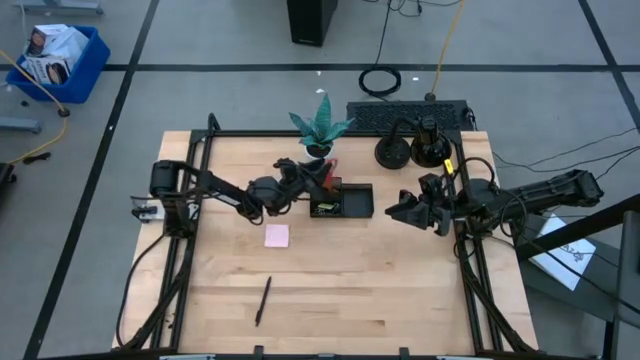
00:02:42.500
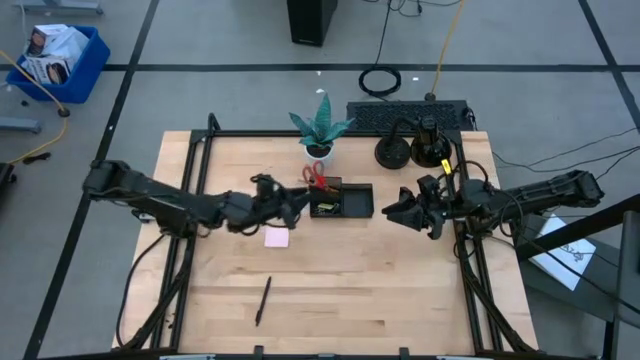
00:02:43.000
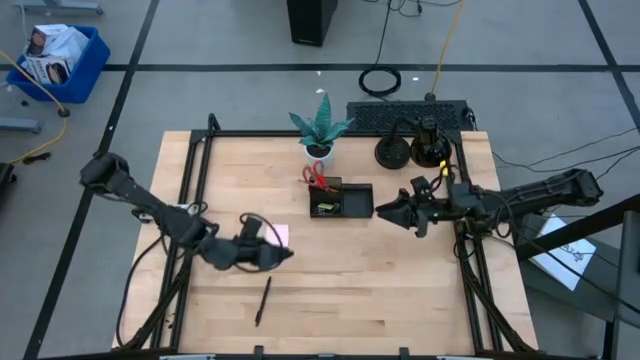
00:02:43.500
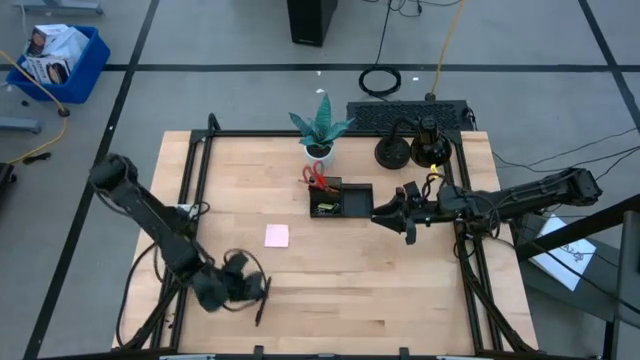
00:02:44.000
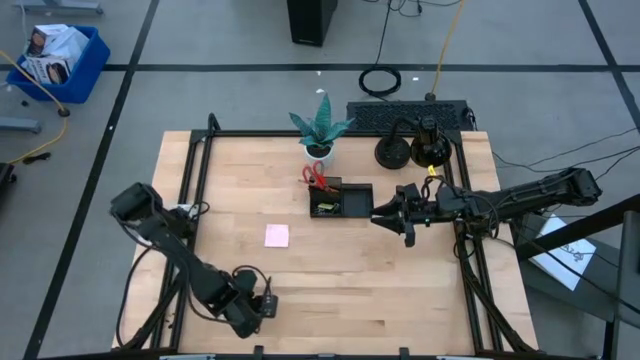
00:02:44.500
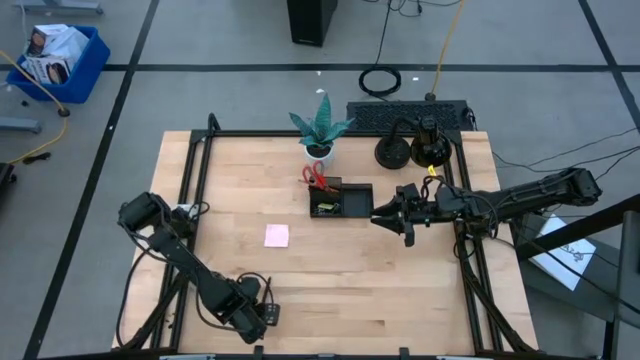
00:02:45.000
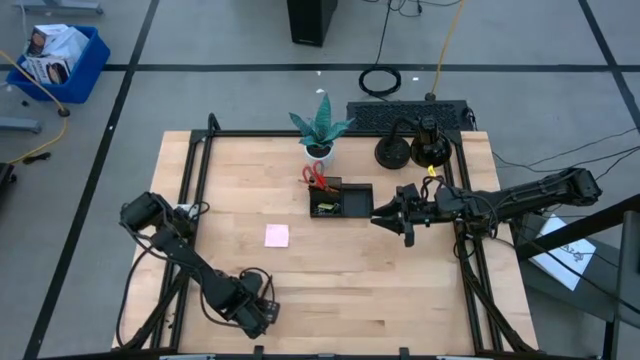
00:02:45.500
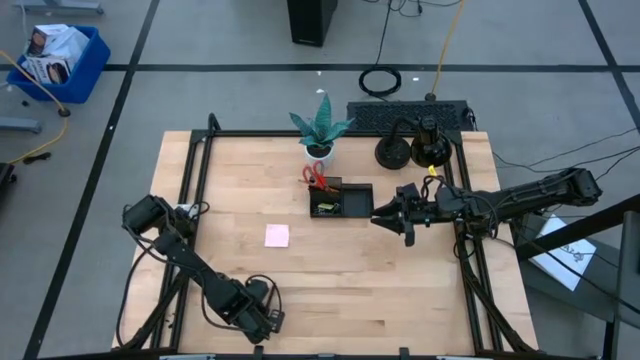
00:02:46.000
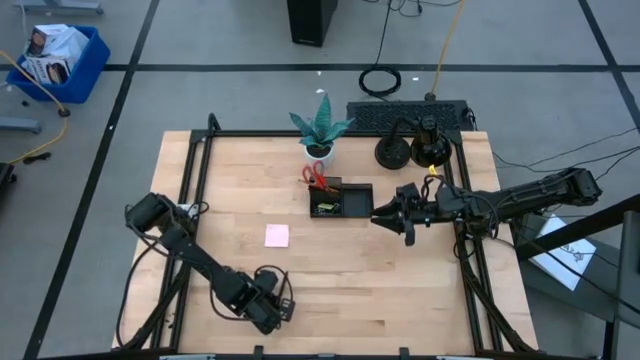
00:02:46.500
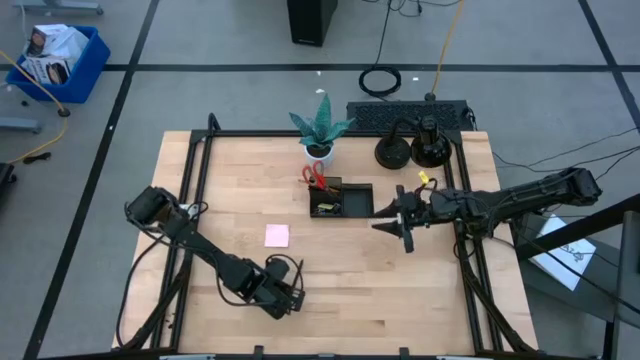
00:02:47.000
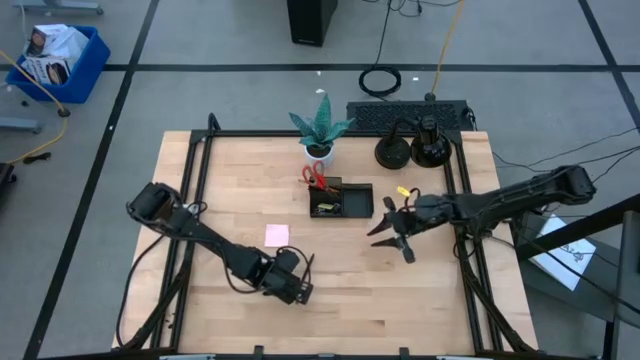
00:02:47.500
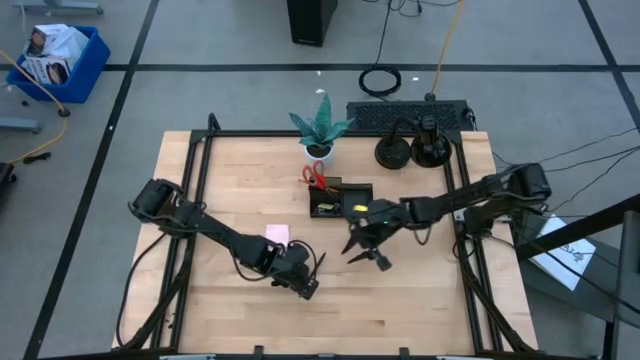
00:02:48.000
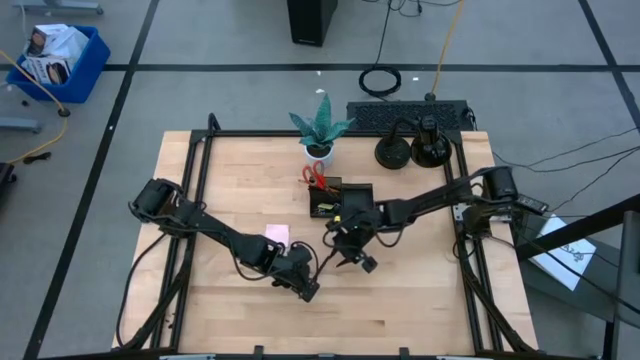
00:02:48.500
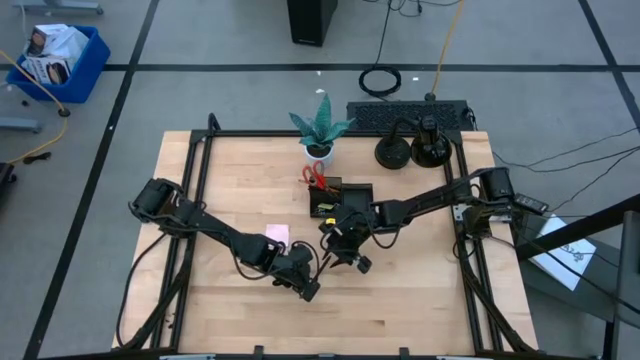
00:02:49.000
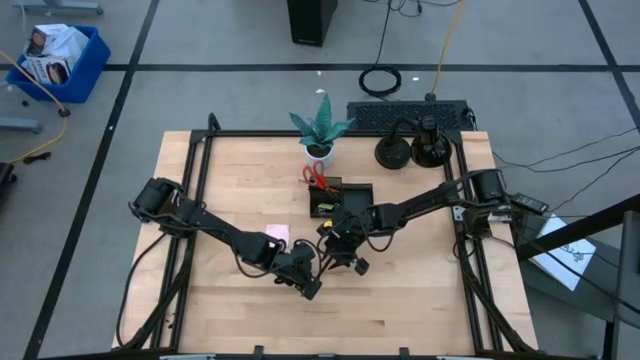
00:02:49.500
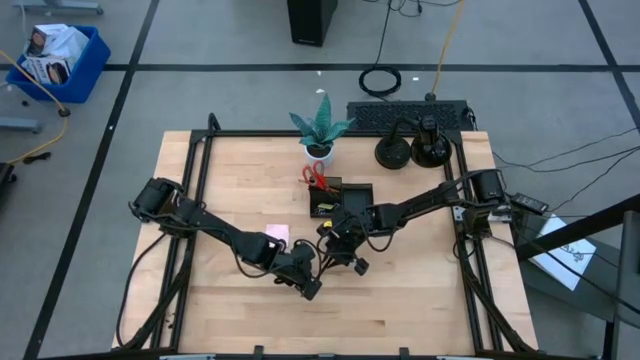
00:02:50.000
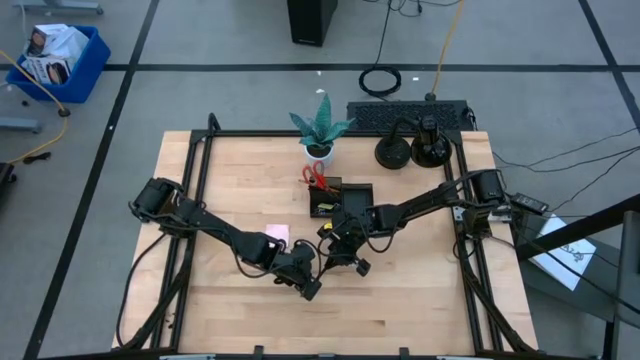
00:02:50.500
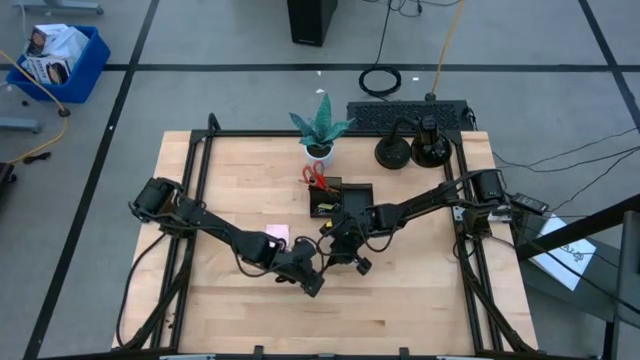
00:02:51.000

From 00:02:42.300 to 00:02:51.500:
Task: Pick and place office supplies into organizer
Put the black pen into the black desk organizer

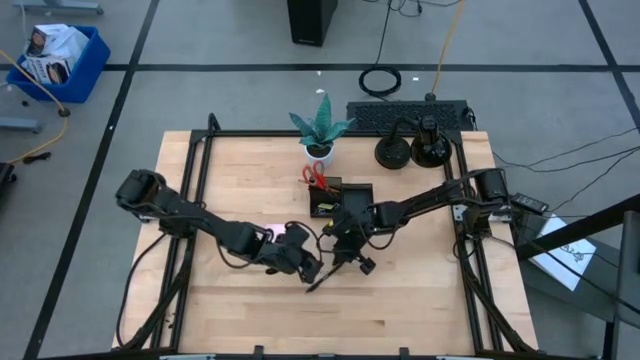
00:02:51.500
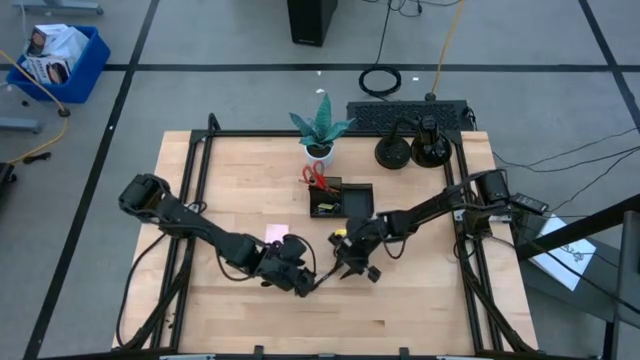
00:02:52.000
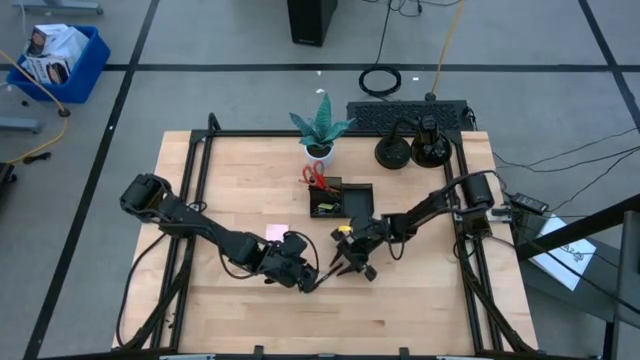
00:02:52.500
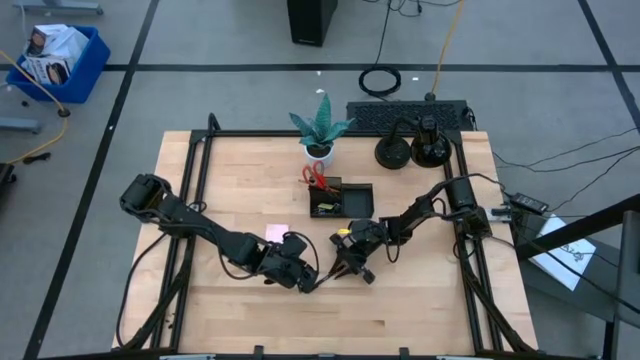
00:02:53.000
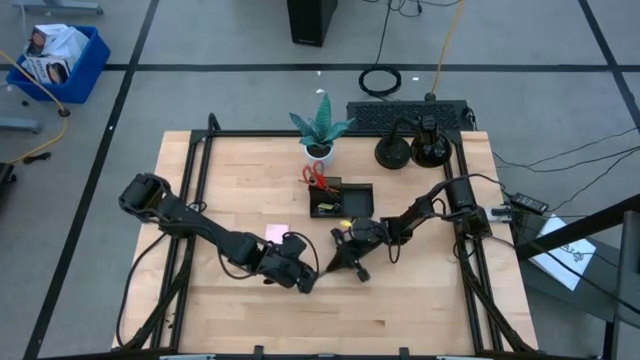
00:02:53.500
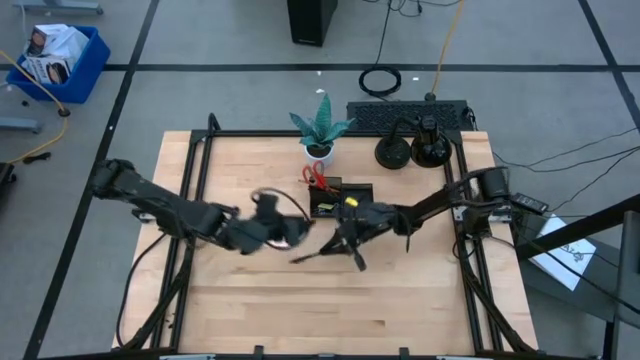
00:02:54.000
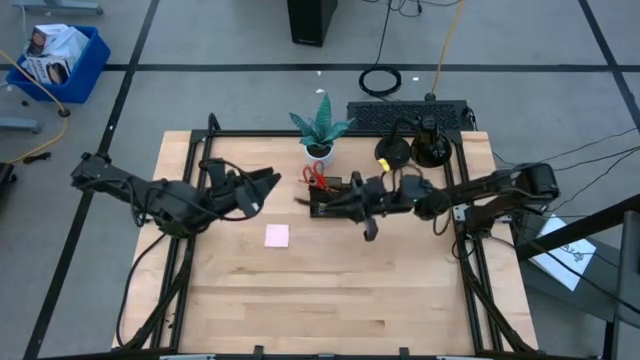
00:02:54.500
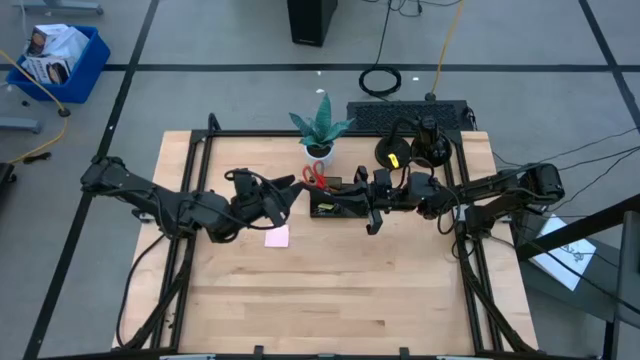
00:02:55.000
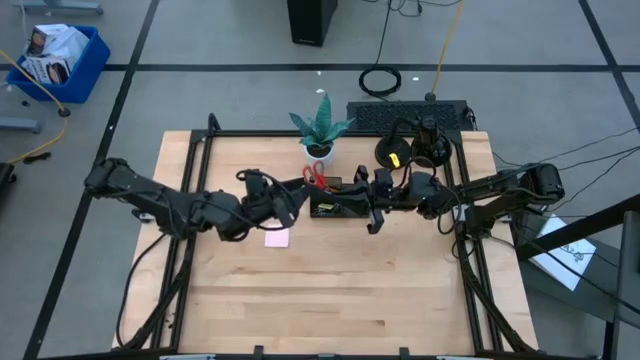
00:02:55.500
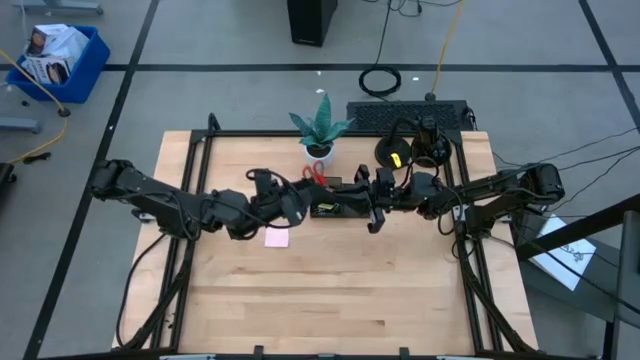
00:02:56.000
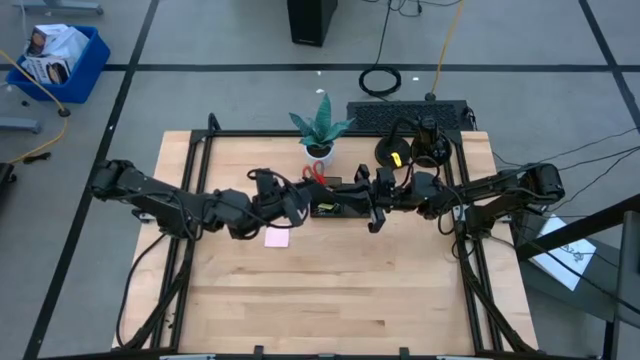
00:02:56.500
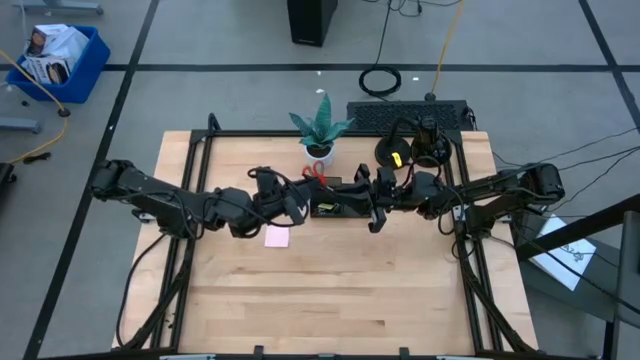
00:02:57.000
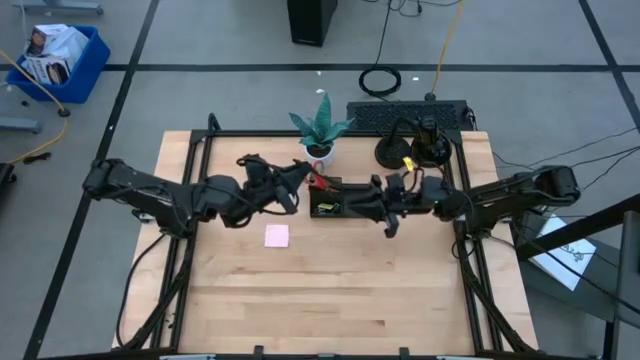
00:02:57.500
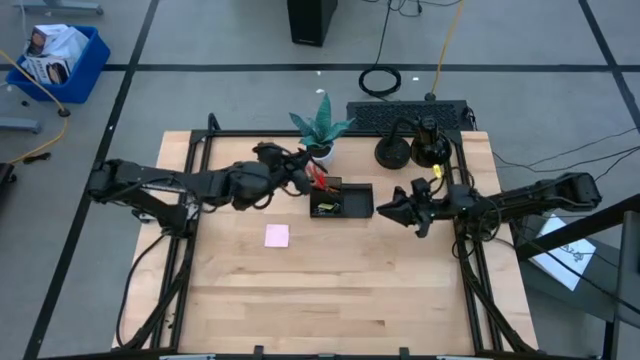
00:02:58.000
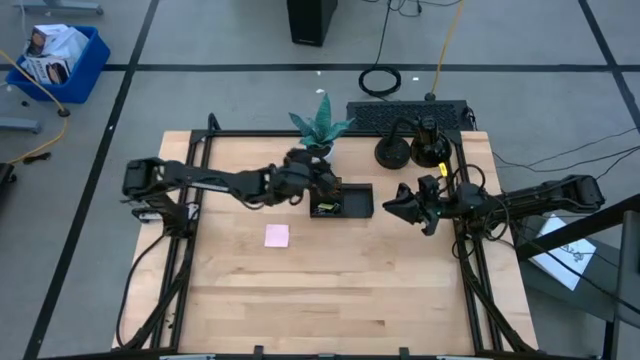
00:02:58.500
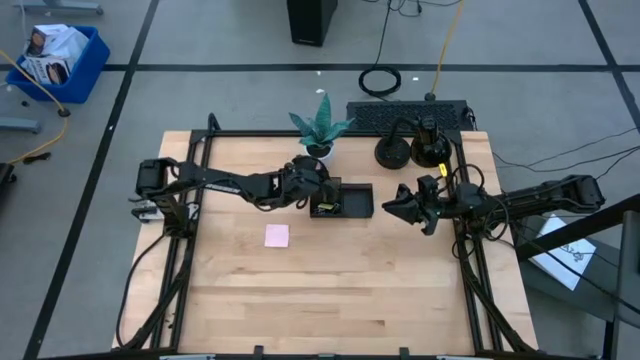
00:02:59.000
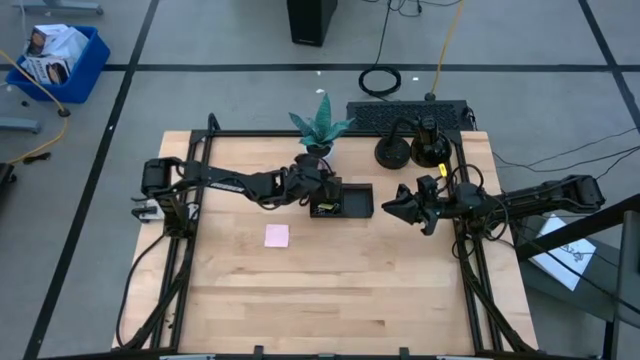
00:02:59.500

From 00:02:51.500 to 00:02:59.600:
Put the black pen into the black desk organizer

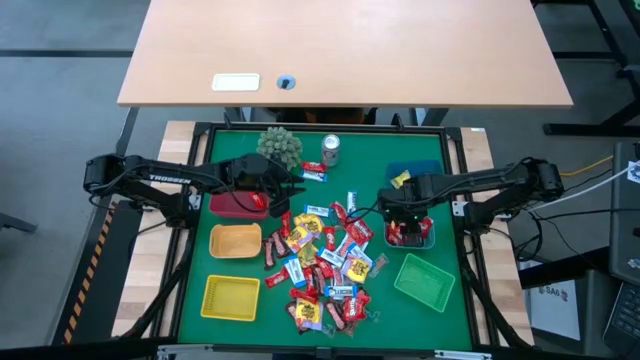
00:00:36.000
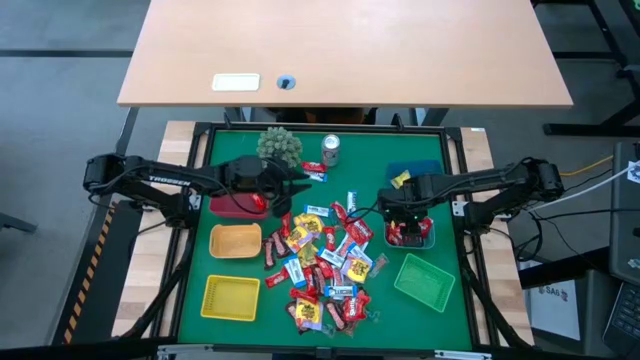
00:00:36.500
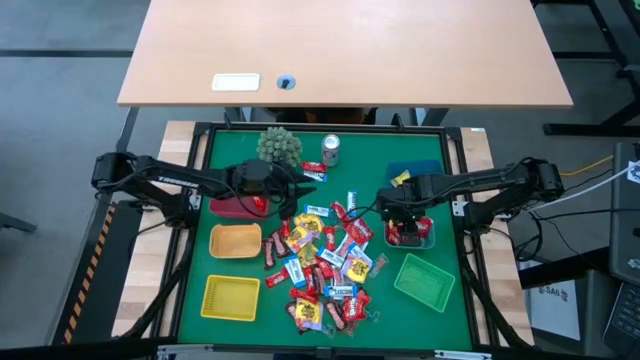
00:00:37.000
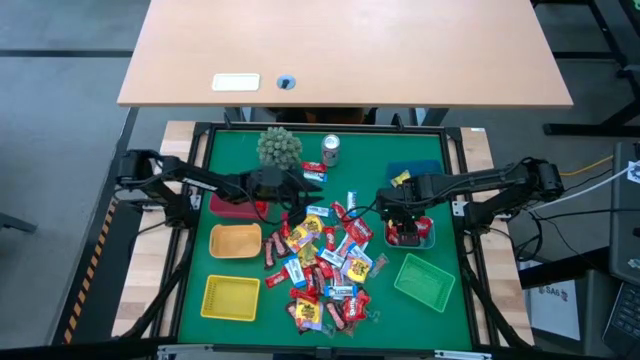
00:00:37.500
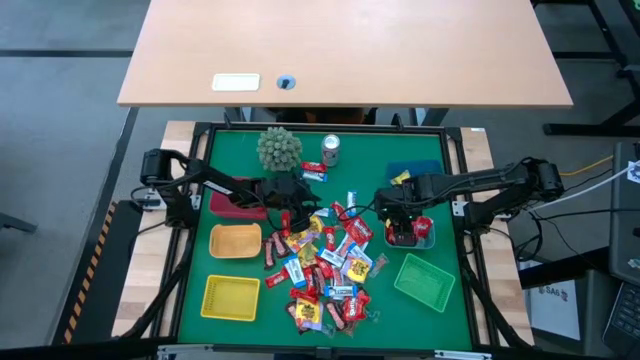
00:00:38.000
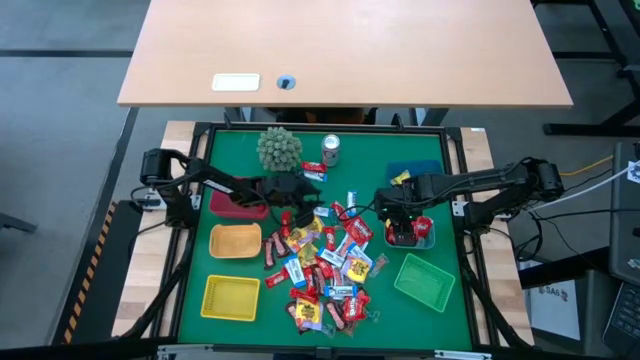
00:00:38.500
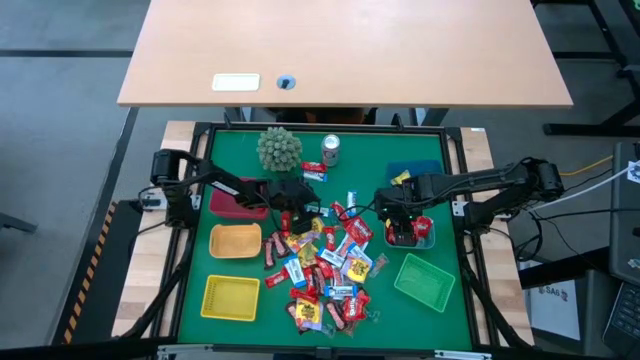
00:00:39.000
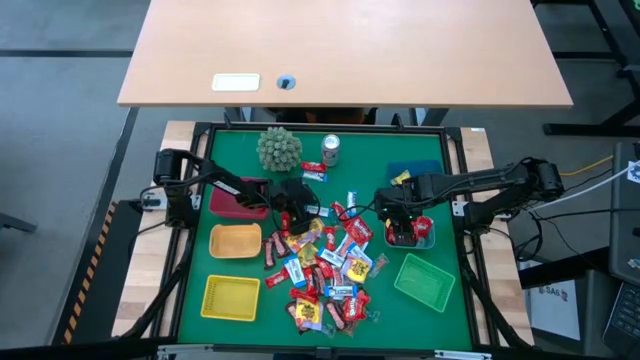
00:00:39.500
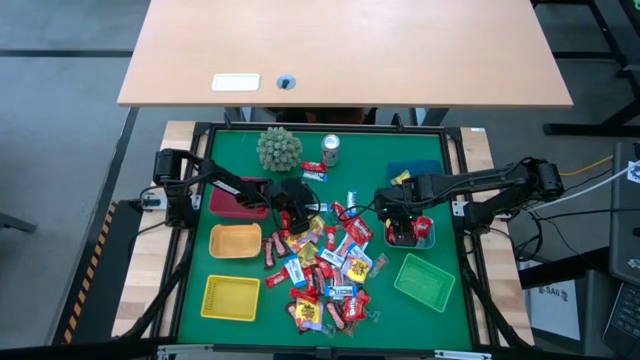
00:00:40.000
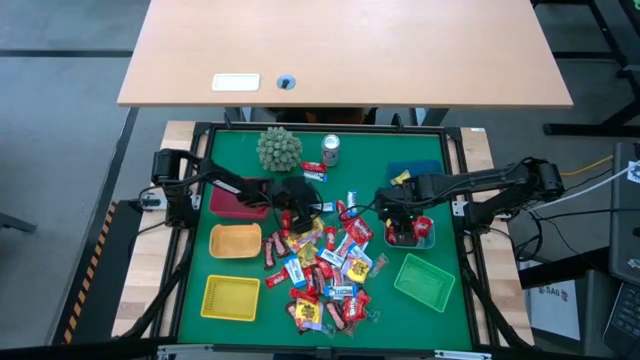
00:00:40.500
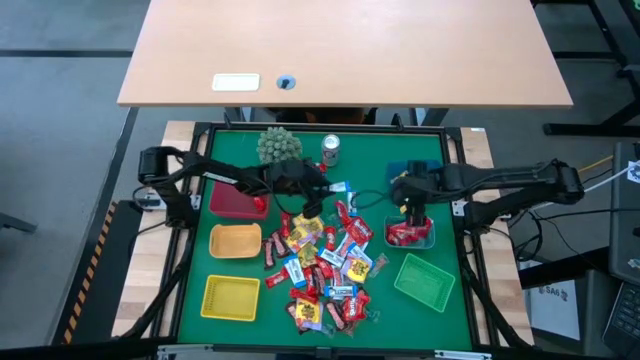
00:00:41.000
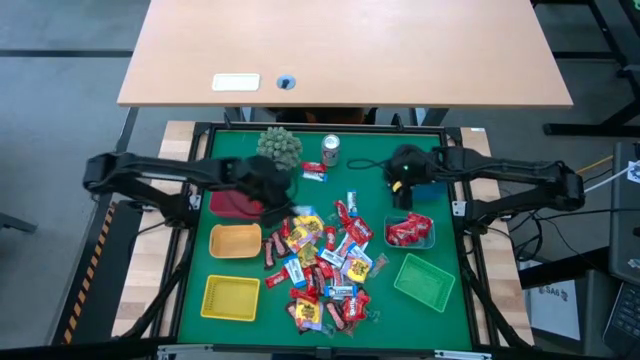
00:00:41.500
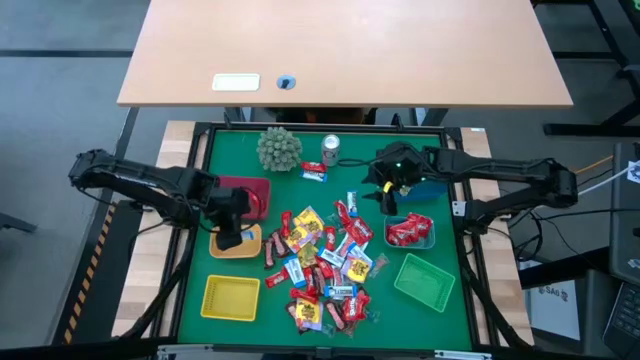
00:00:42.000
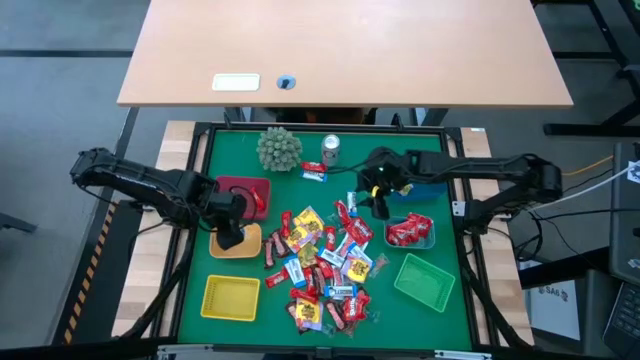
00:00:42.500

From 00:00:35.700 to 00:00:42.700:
Task: Sort candy
Put the white chocolate bar into the orange bin
